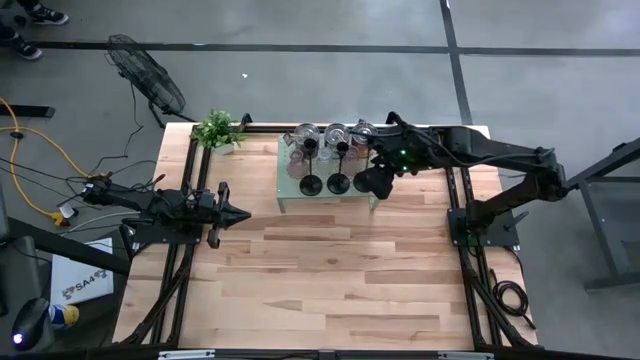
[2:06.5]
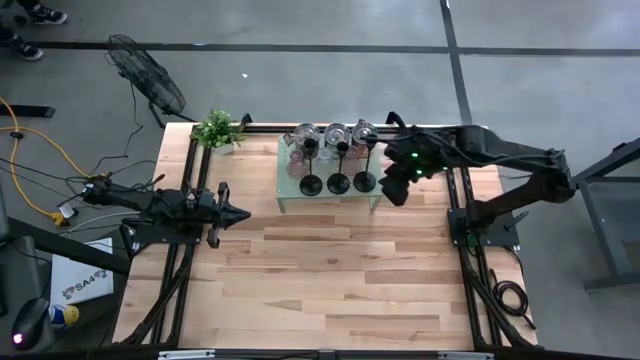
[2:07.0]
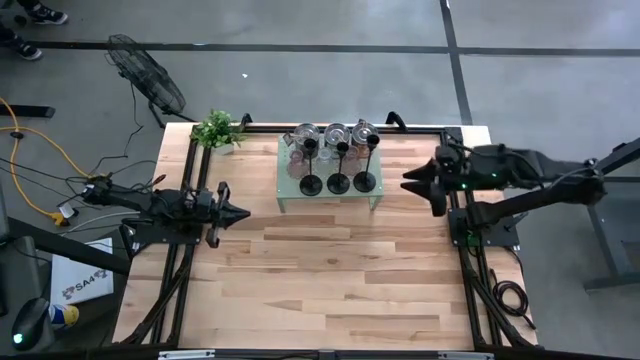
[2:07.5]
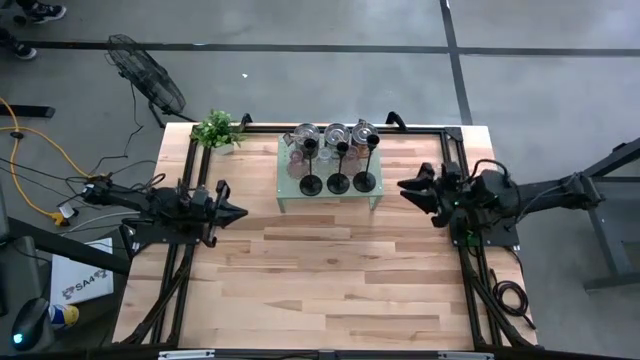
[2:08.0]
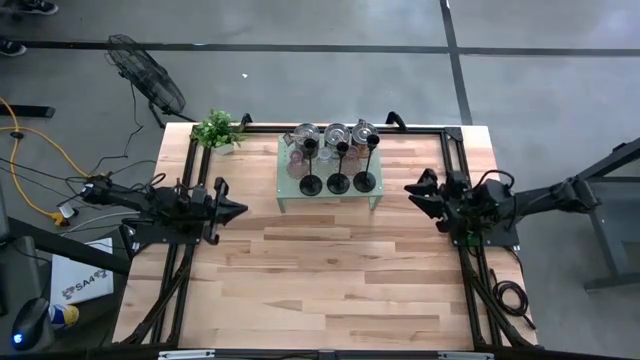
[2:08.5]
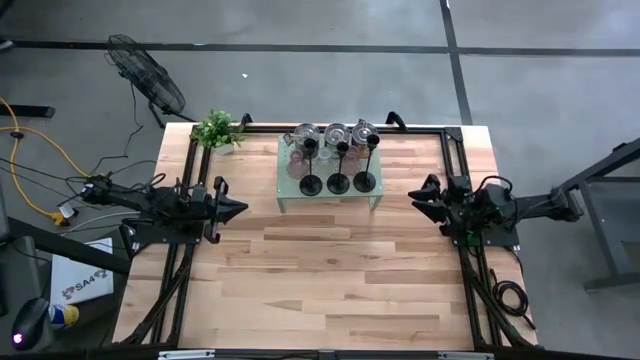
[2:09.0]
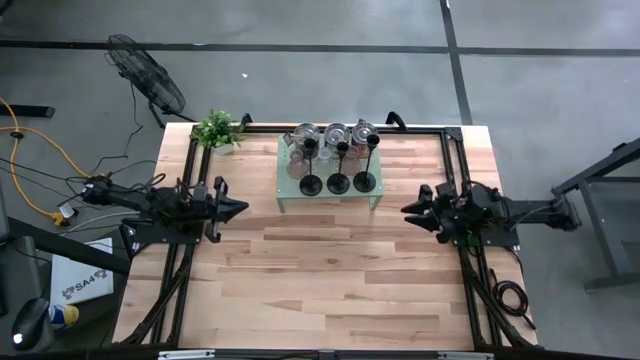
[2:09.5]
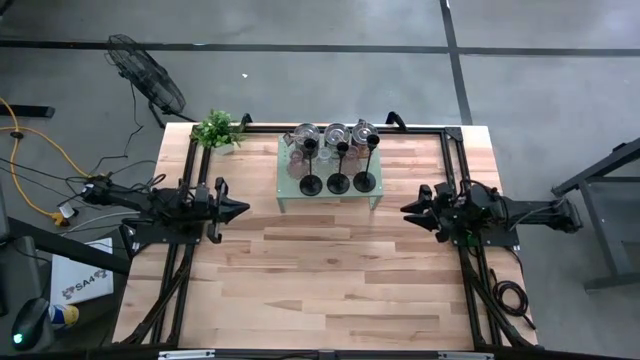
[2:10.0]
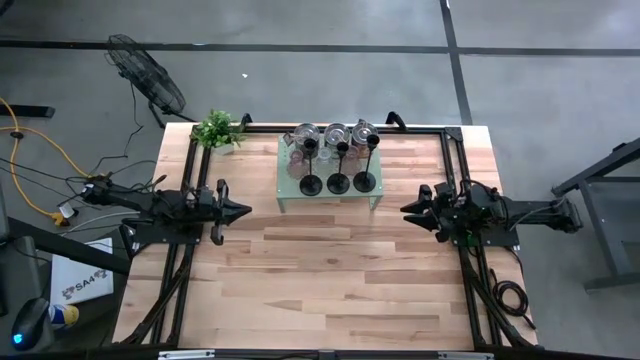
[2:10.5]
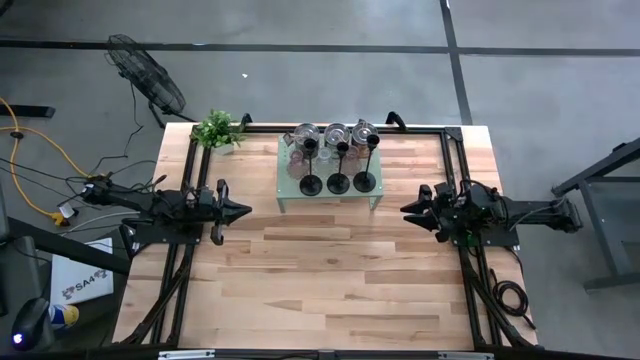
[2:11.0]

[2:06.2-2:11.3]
Task: Pick & Place candle stick holders
Return to Home Position

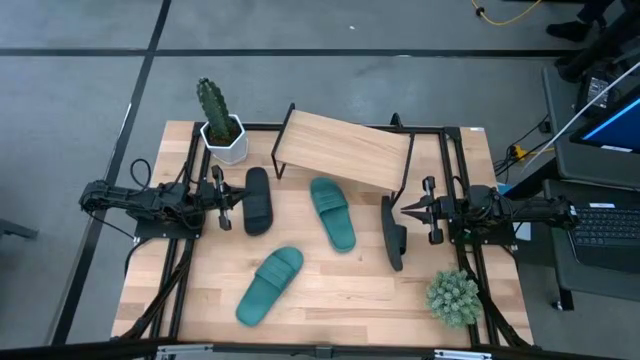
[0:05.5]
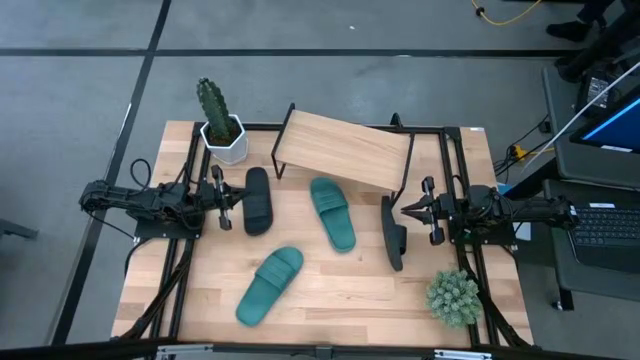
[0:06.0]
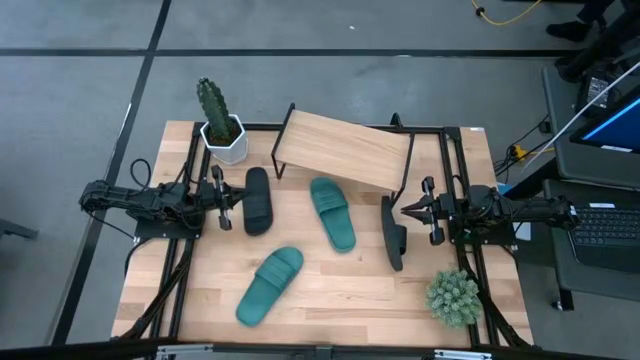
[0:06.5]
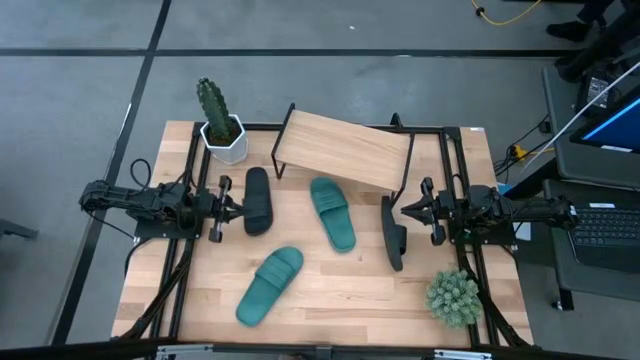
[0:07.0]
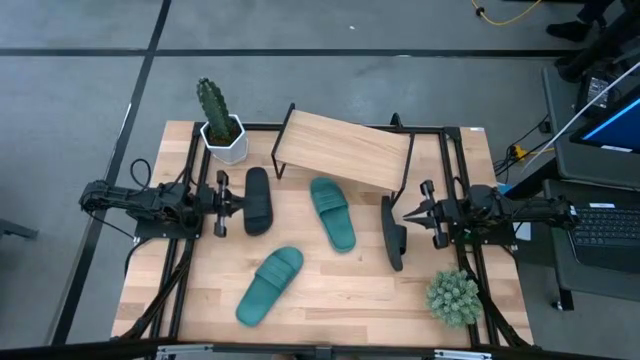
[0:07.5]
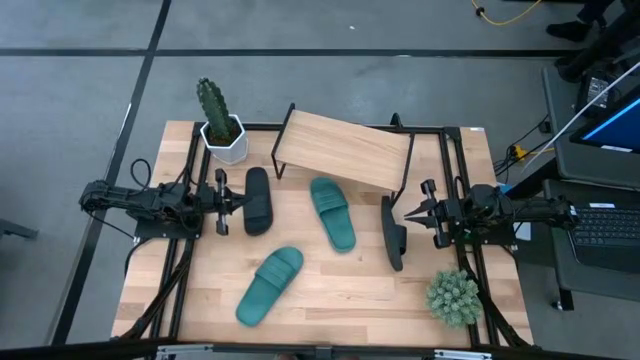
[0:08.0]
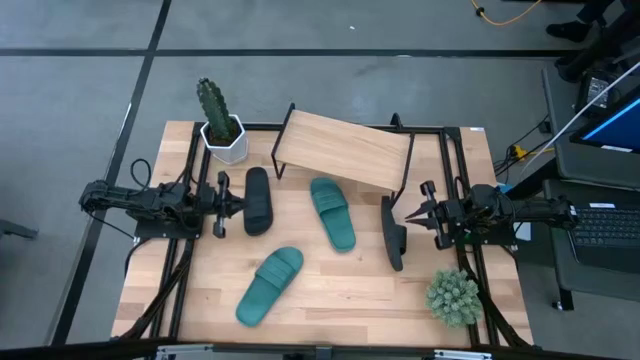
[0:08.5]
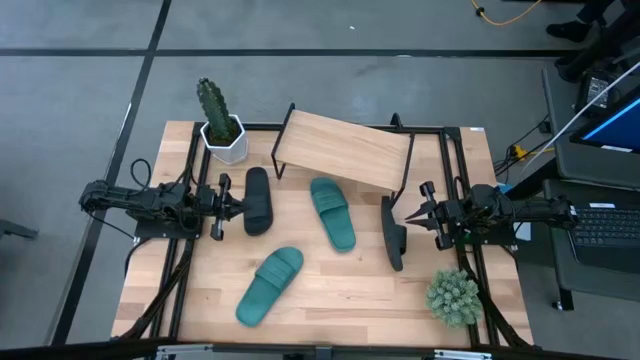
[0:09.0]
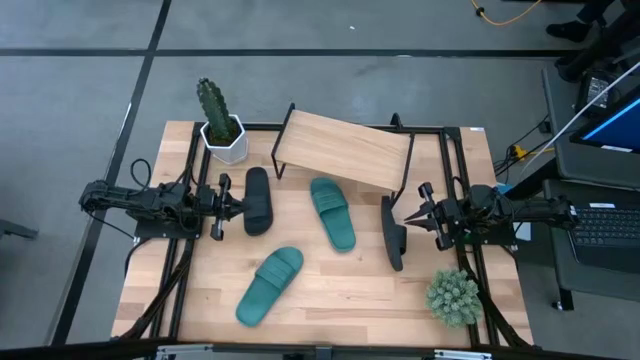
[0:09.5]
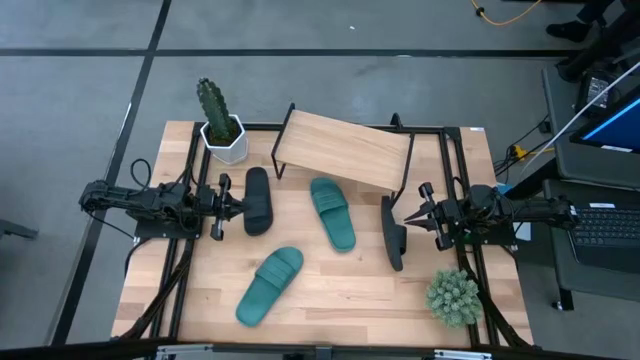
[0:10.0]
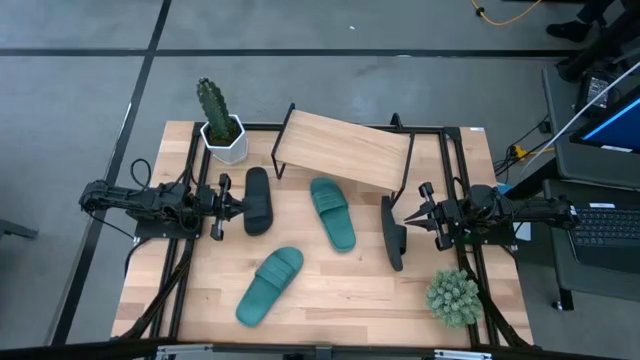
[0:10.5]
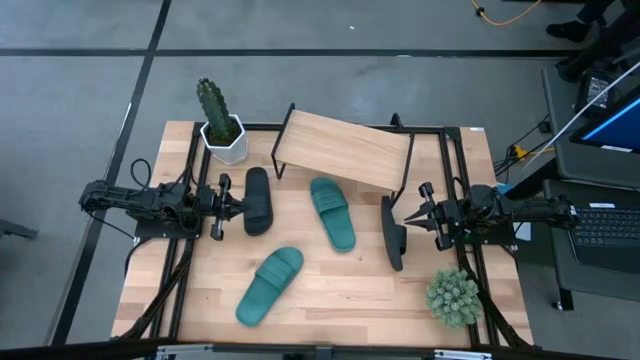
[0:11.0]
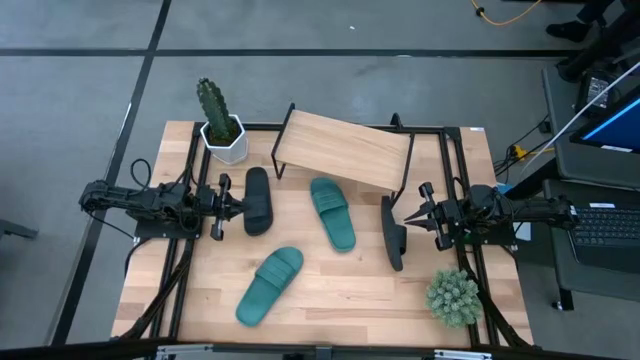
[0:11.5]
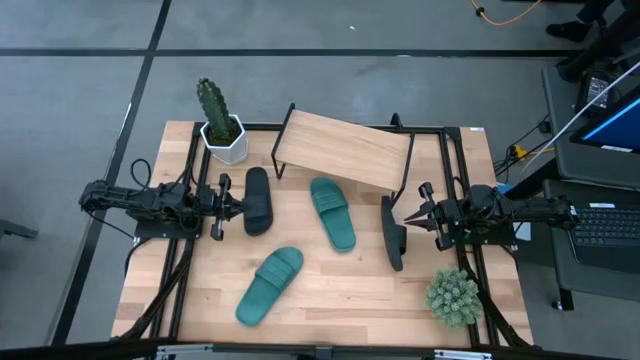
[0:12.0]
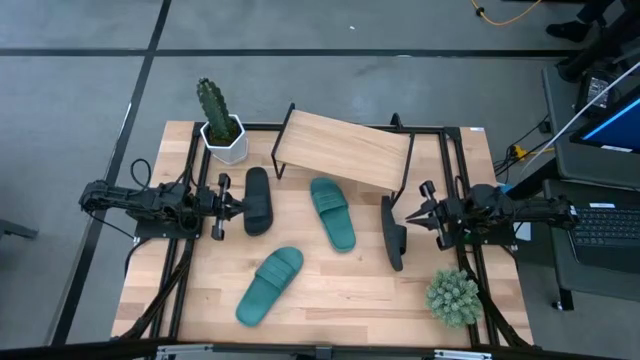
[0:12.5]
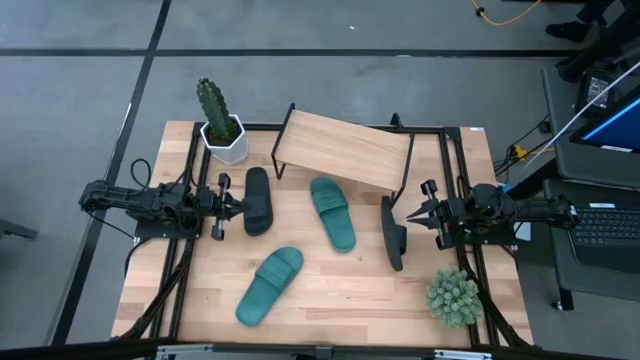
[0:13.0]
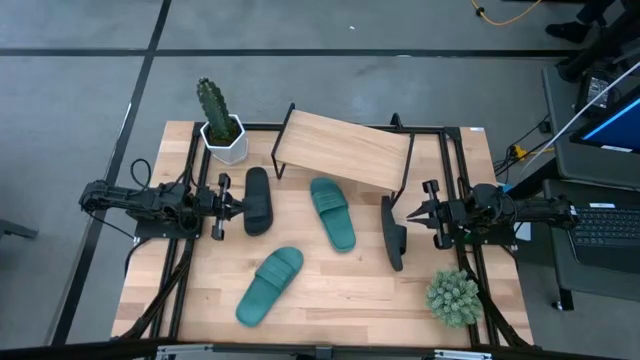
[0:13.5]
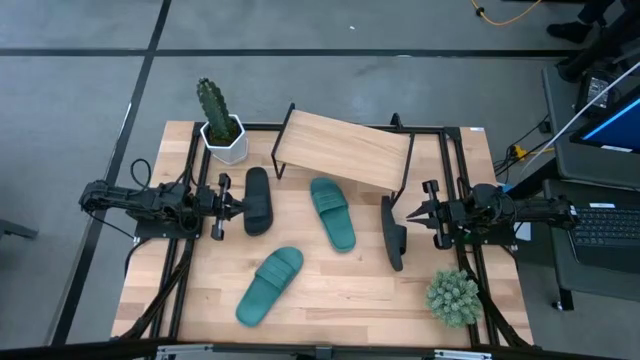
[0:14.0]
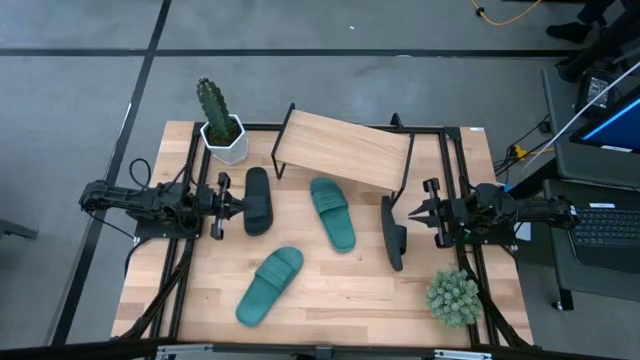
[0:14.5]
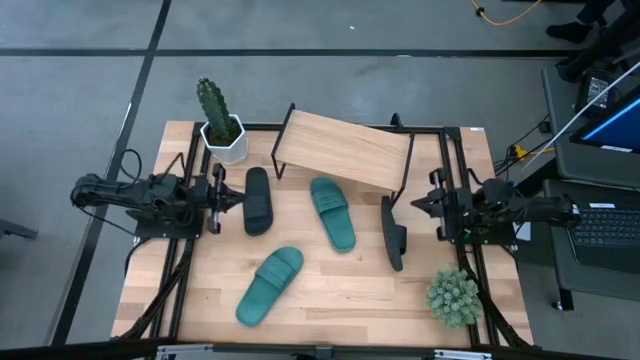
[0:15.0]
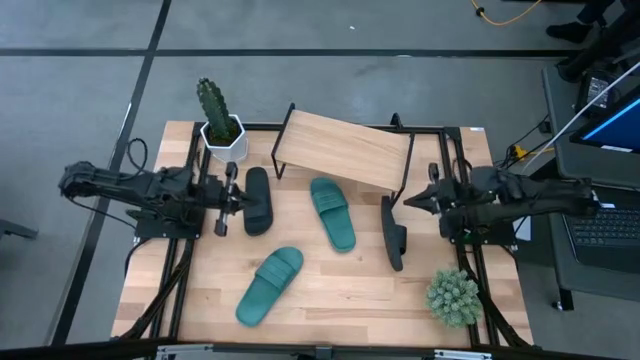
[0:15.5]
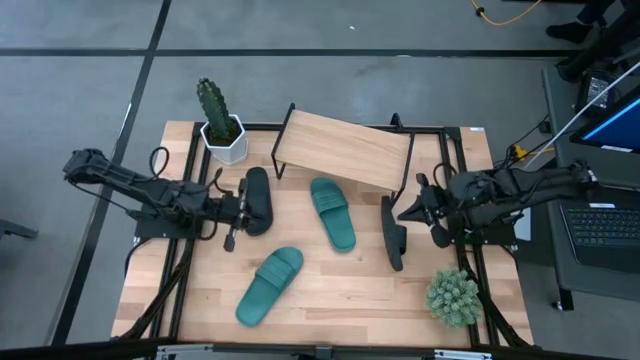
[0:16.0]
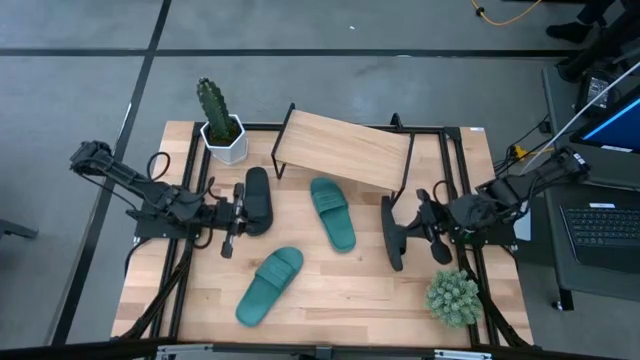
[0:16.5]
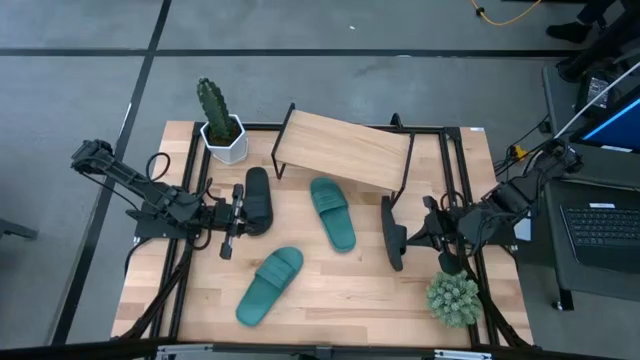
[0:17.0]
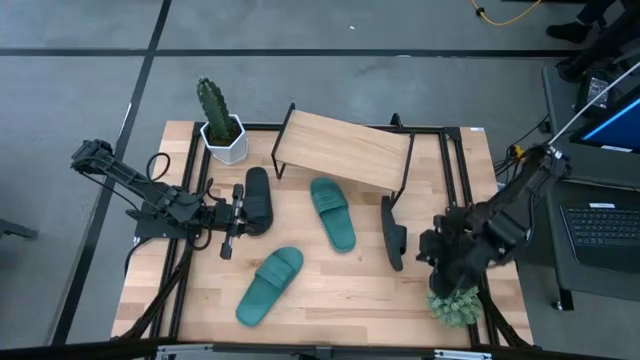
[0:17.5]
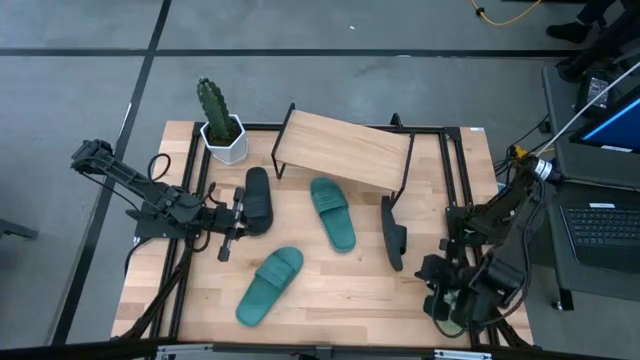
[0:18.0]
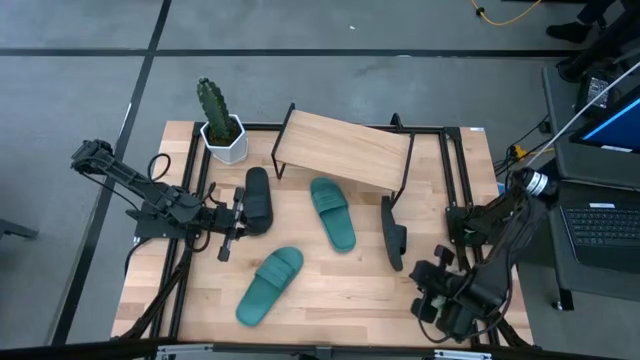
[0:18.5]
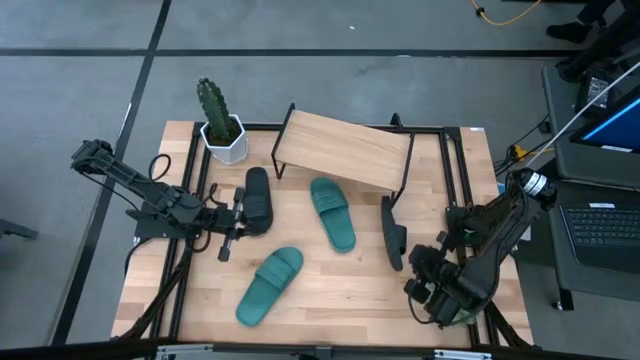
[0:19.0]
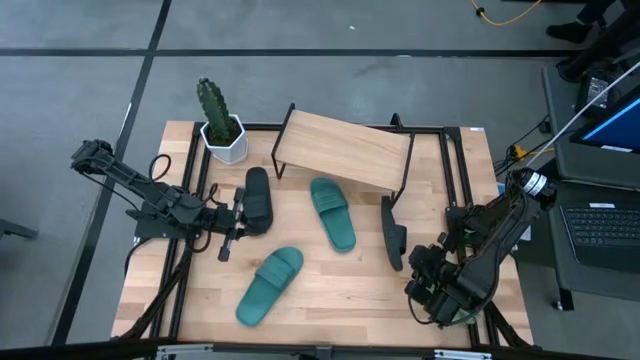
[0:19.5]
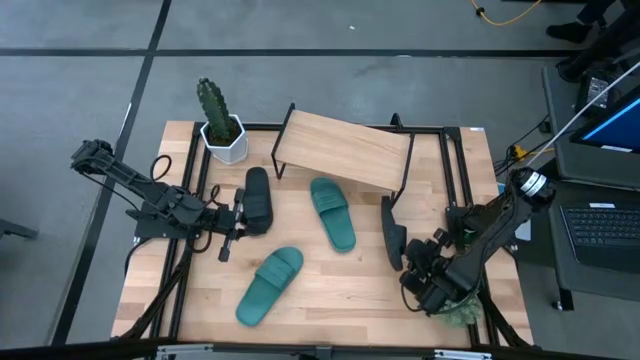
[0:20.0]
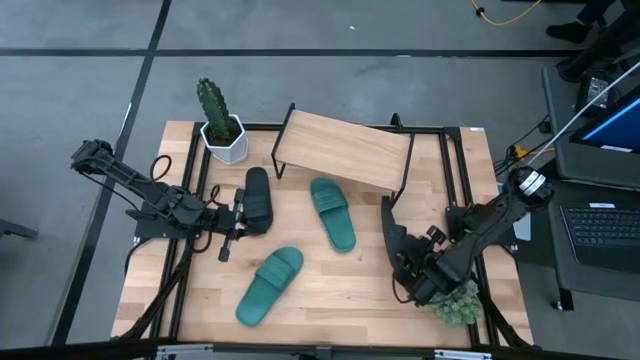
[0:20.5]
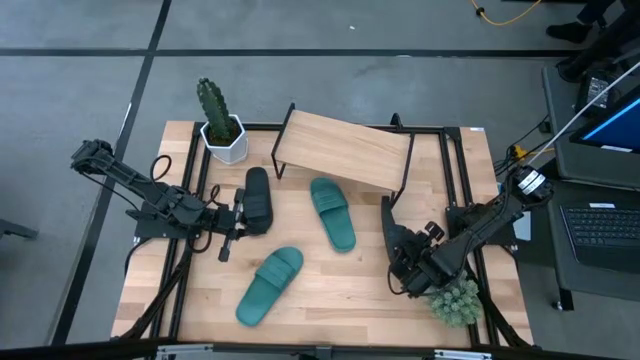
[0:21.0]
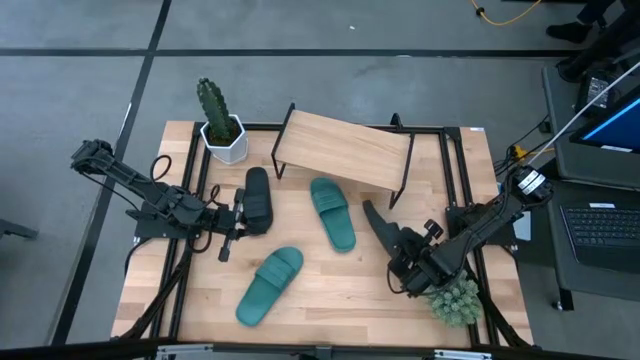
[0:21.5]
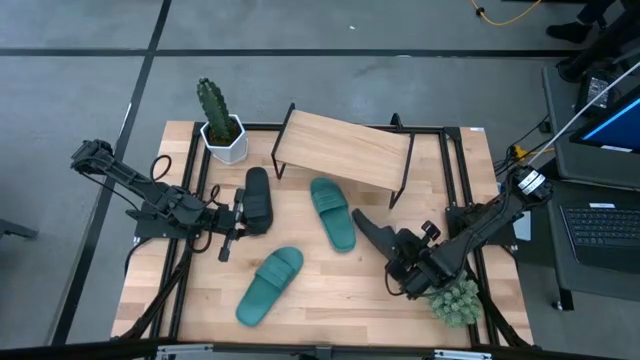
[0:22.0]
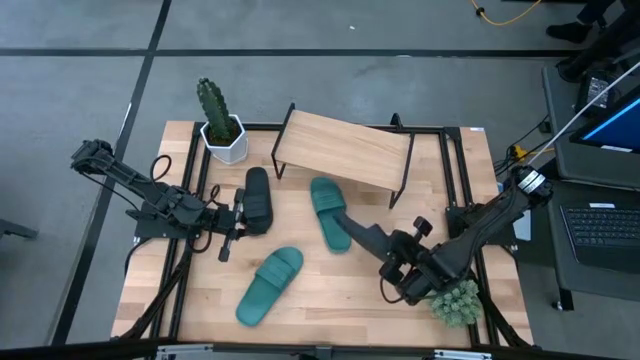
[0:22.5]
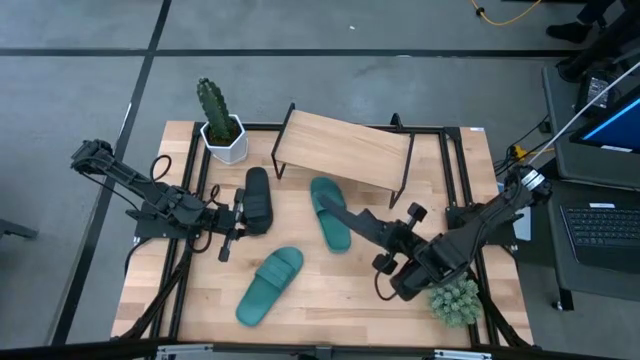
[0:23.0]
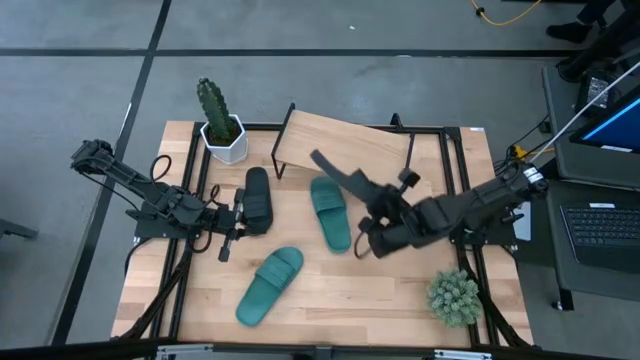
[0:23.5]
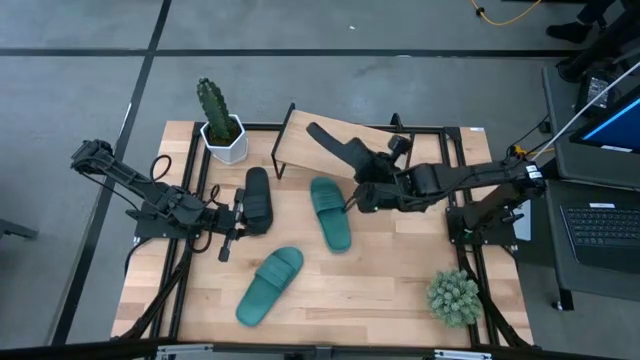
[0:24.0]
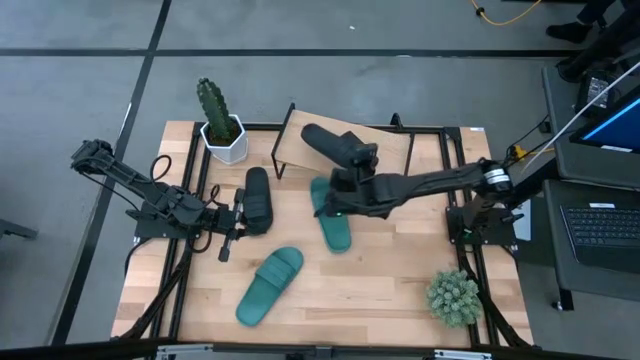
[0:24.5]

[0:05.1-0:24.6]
Task: Pick and place slides into the shelf
Put the bottom black slide on the shelf
